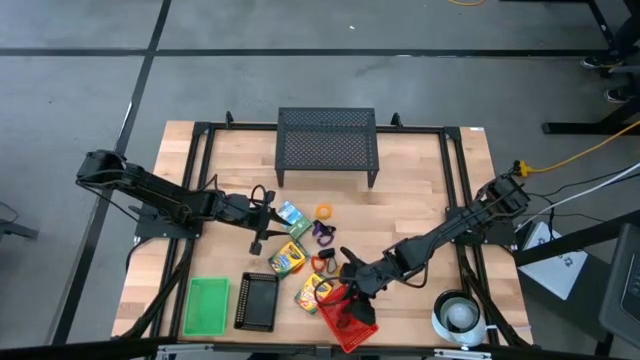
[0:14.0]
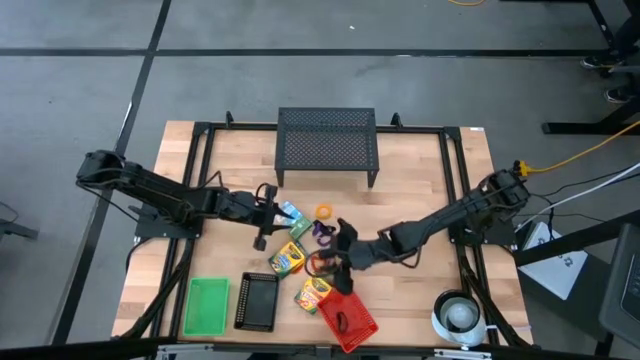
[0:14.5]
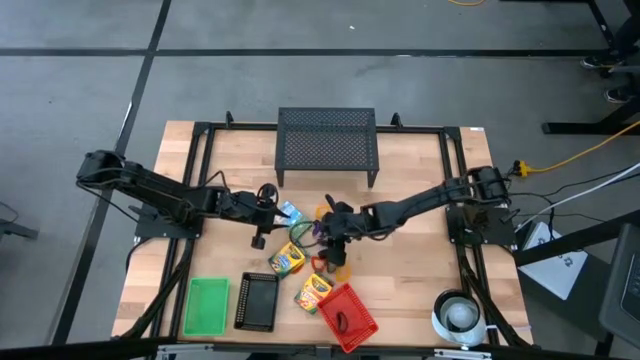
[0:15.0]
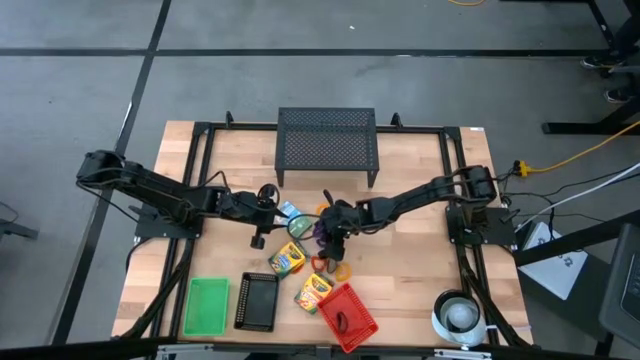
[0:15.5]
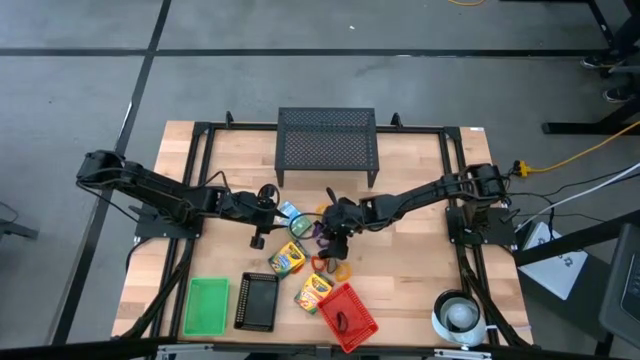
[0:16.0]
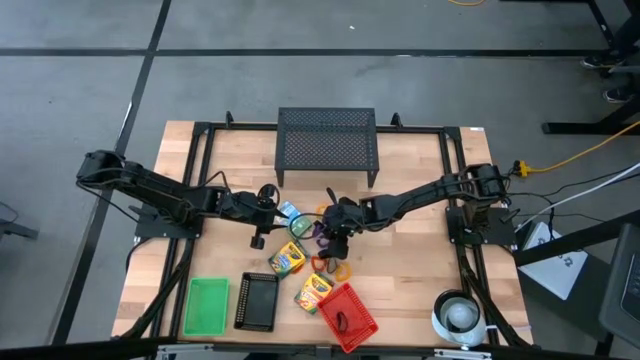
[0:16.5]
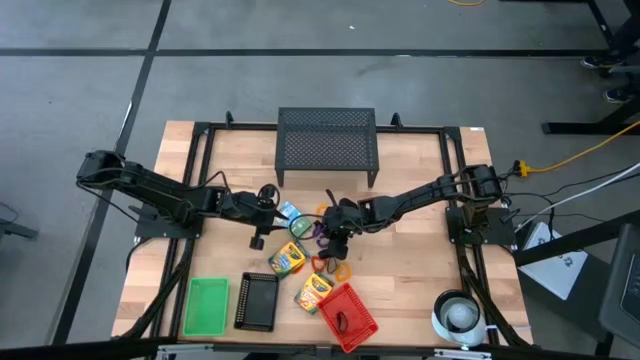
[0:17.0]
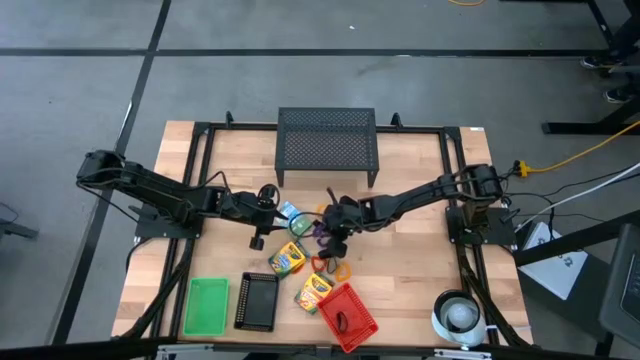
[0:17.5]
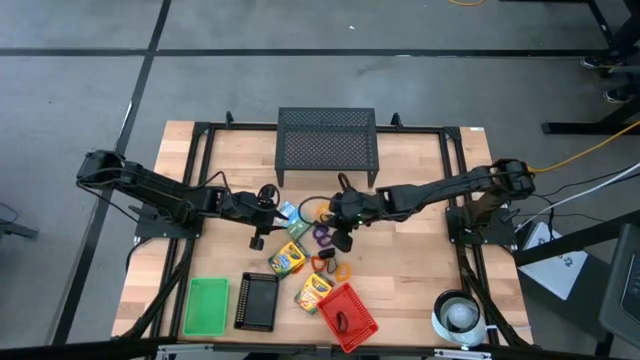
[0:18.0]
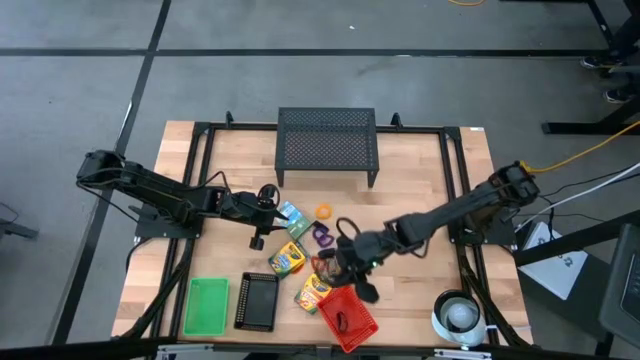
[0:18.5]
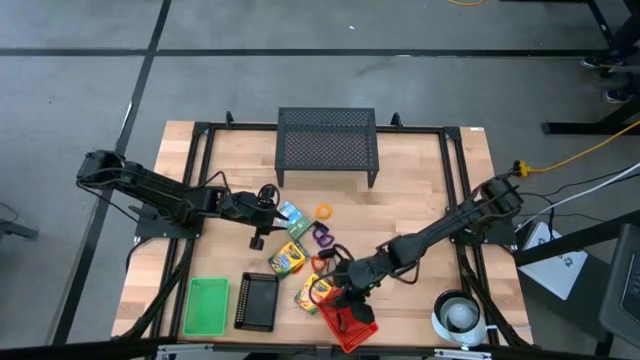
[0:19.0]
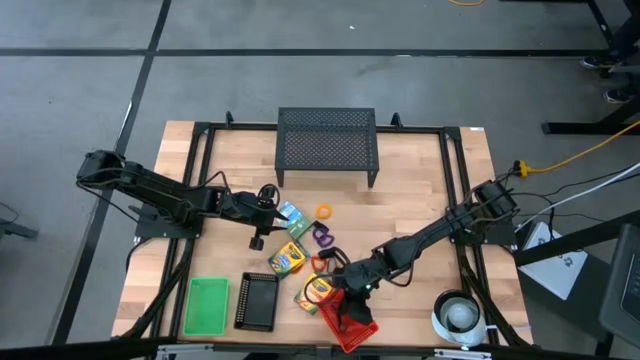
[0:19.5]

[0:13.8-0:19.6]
Task: Pick & Place Office Desk Supplies
Put the black rubber band into the red bin

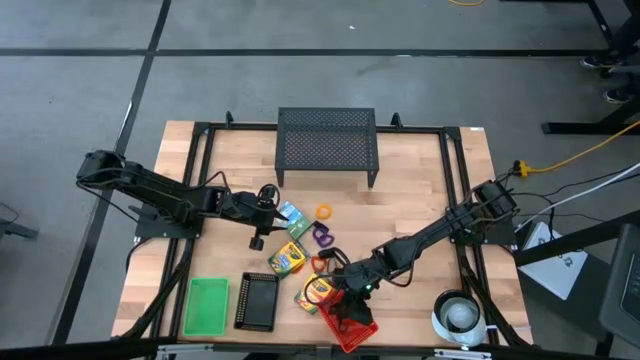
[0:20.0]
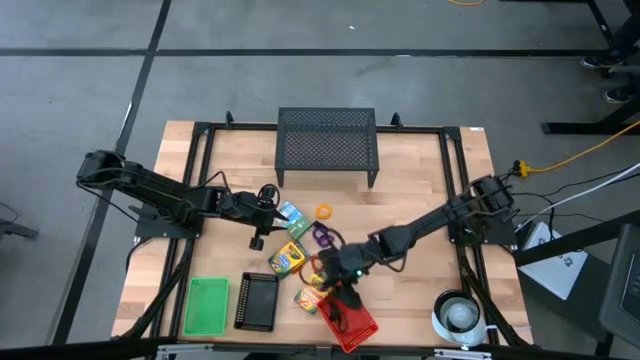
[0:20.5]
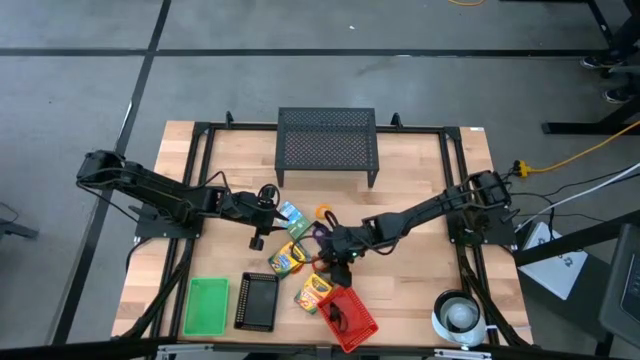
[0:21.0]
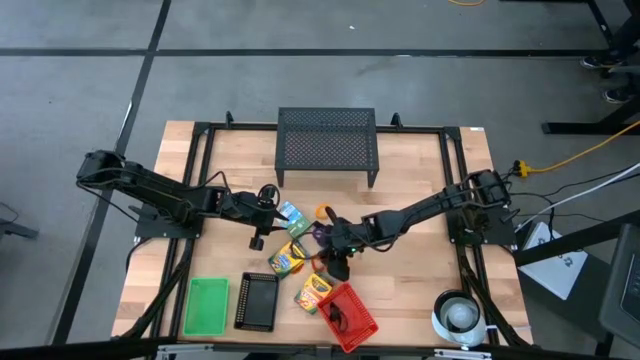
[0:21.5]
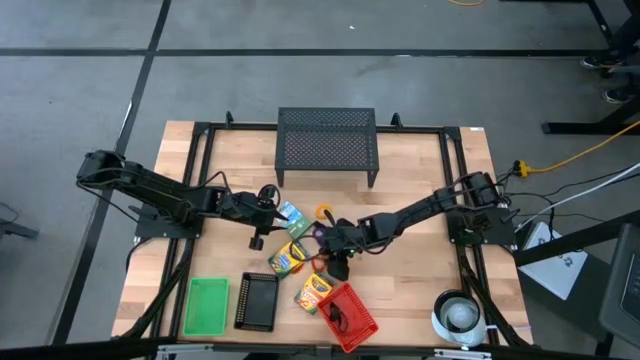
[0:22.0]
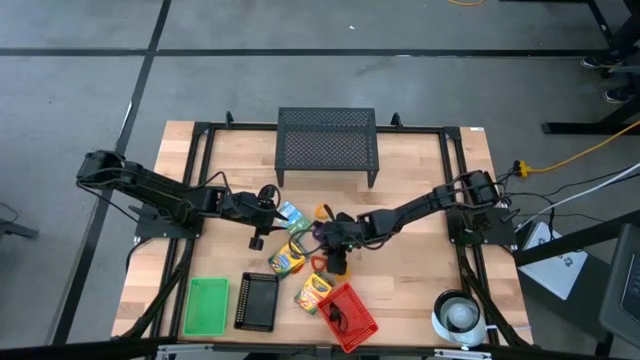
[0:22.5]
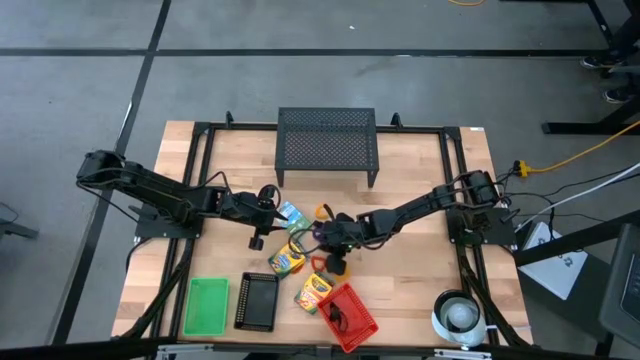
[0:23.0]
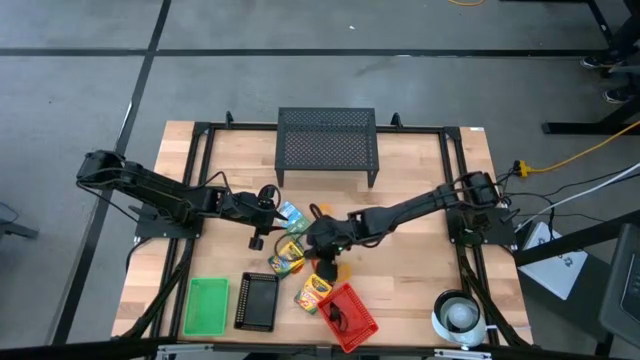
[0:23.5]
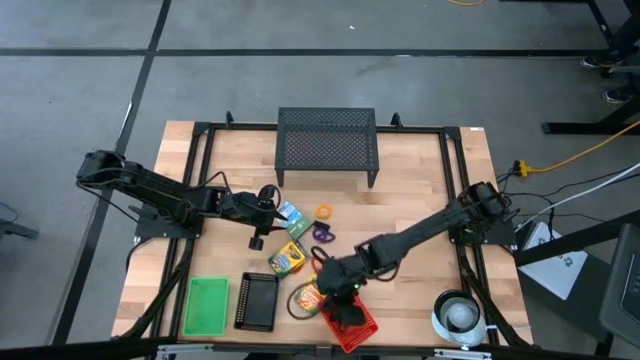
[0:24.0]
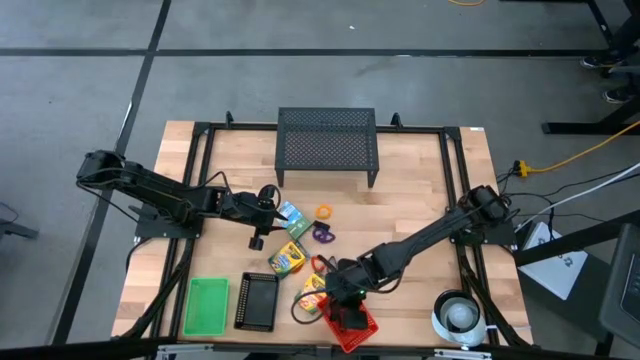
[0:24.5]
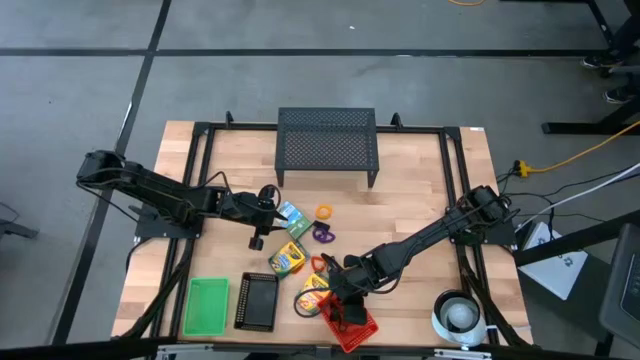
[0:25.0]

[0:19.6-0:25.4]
Put the black rubber band into the red bin

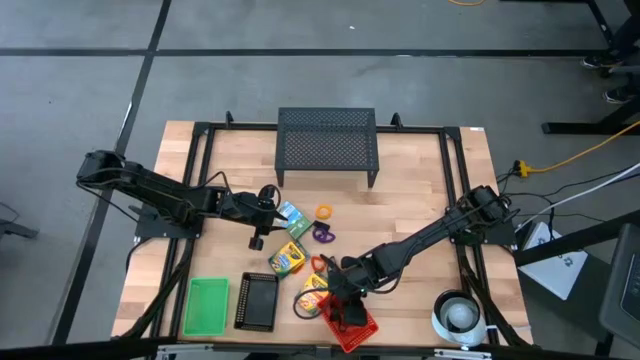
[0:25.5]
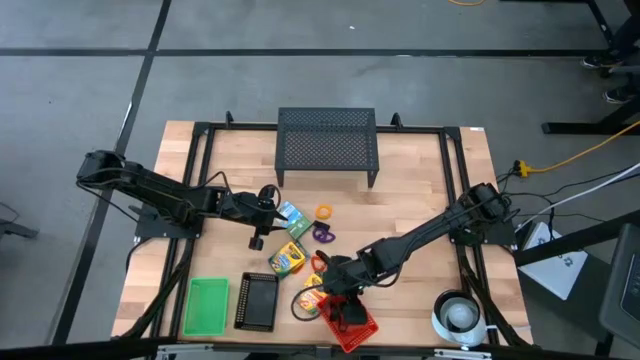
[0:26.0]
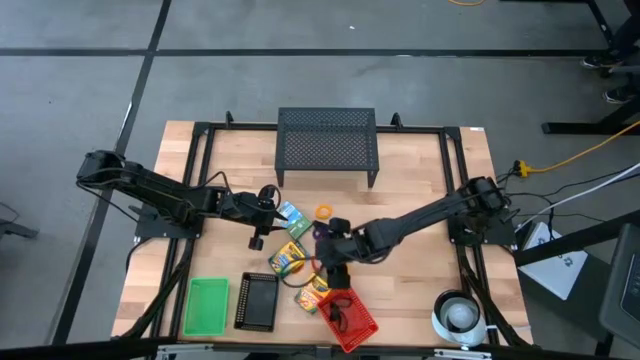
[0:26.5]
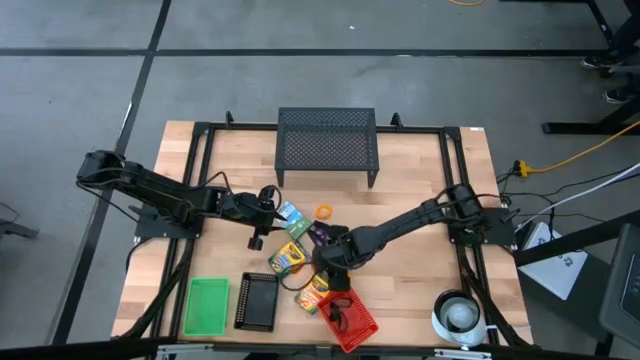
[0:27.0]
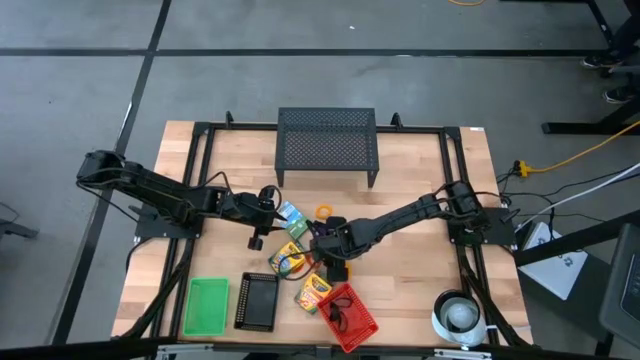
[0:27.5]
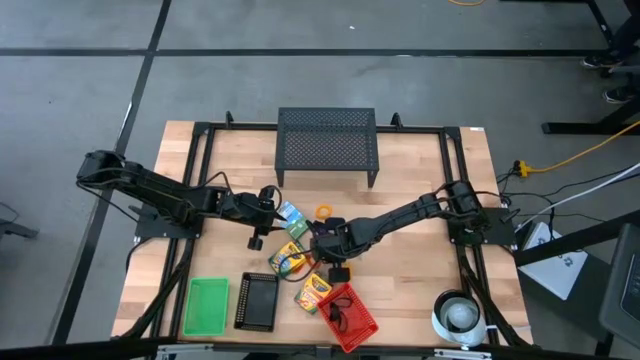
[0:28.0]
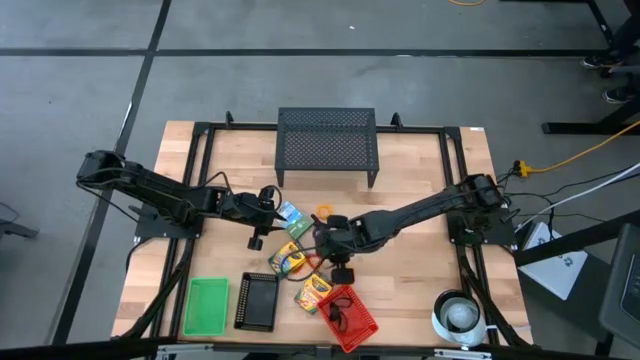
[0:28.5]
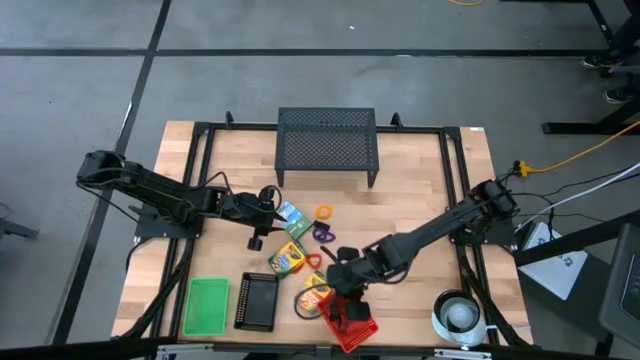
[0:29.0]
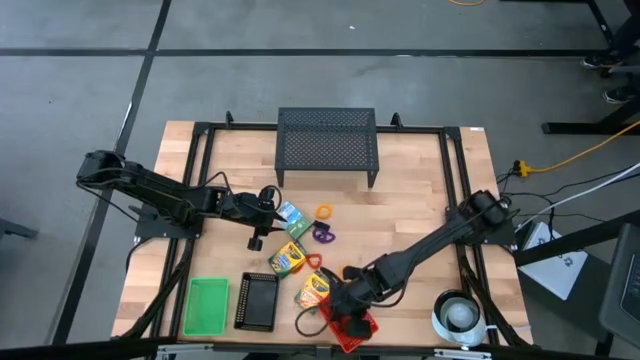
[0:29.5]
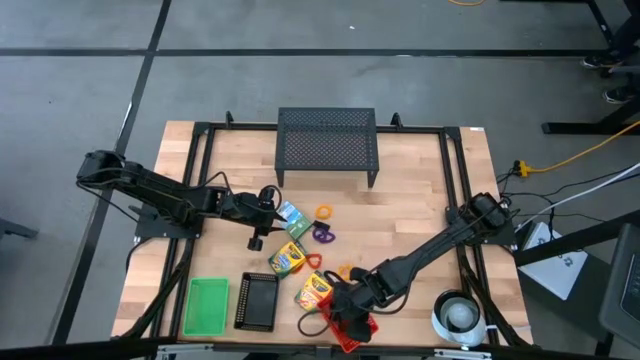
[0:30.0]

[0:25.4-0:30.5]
Put the black rubber band into the red bin

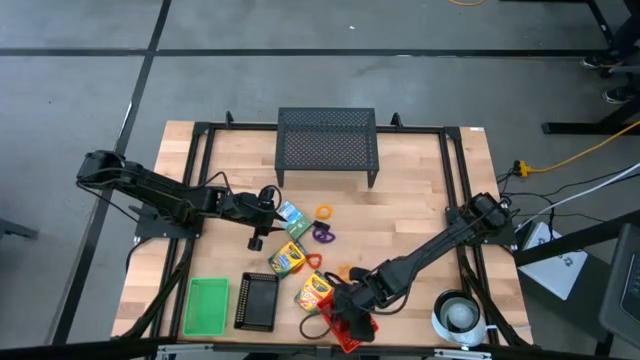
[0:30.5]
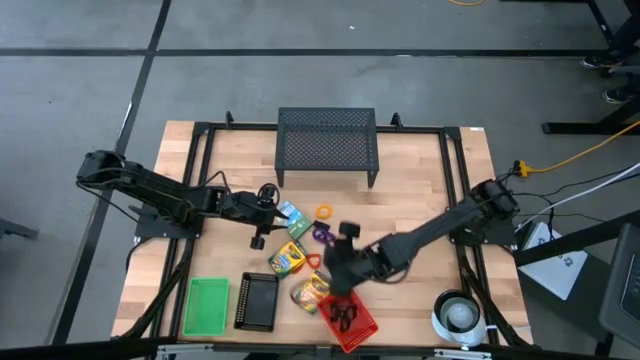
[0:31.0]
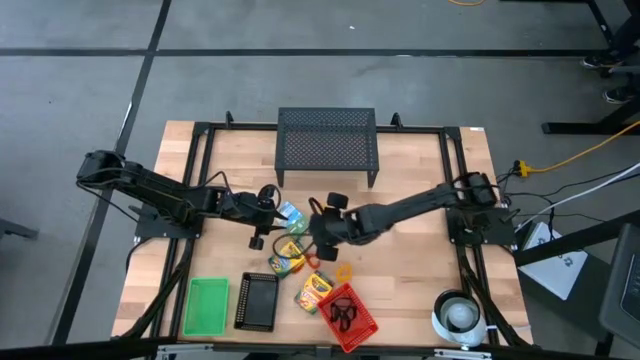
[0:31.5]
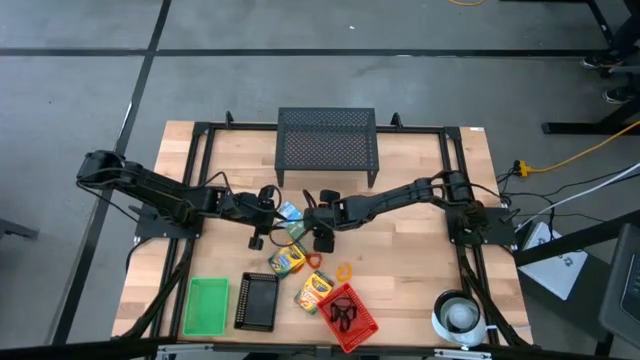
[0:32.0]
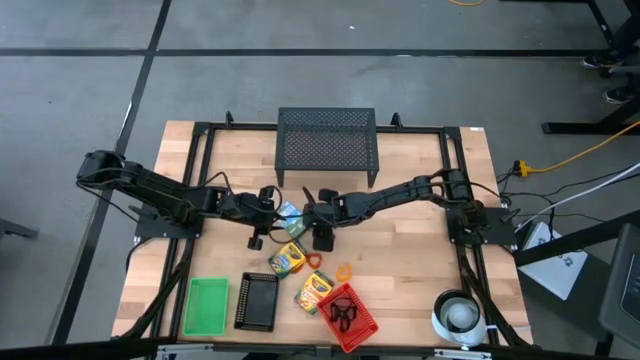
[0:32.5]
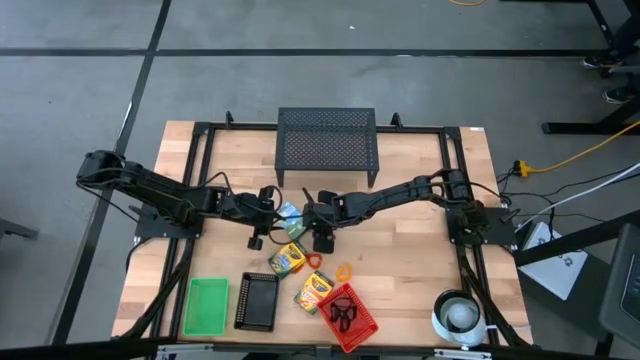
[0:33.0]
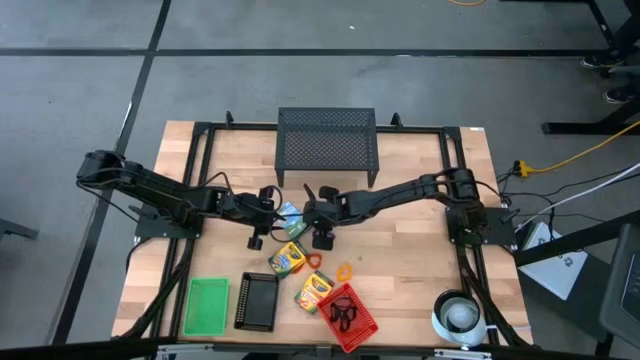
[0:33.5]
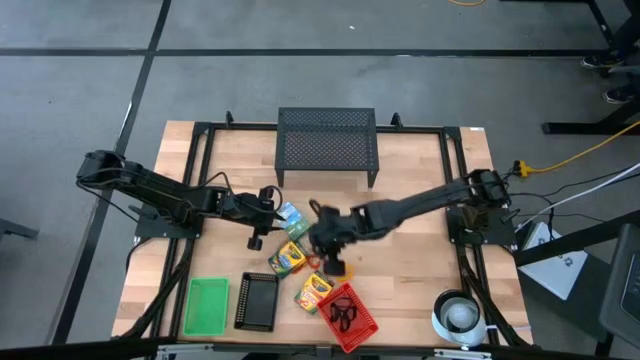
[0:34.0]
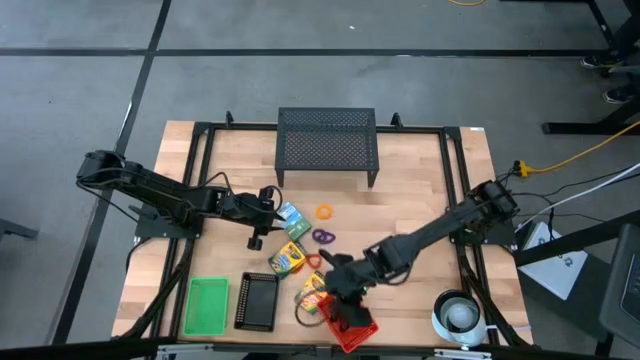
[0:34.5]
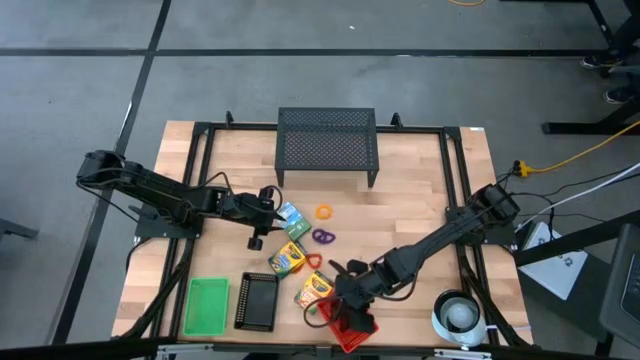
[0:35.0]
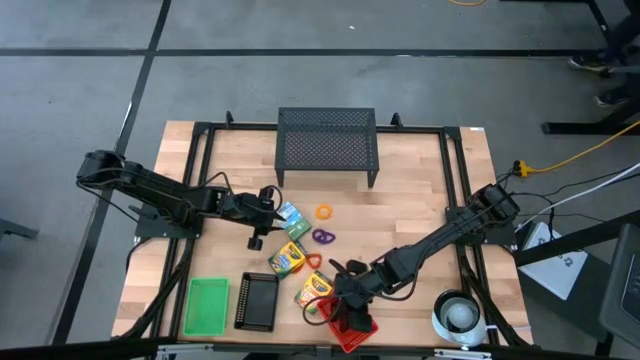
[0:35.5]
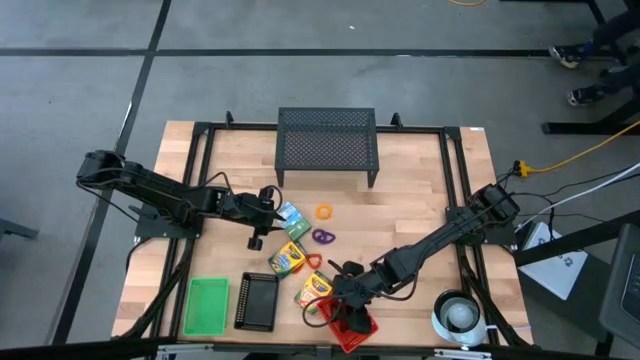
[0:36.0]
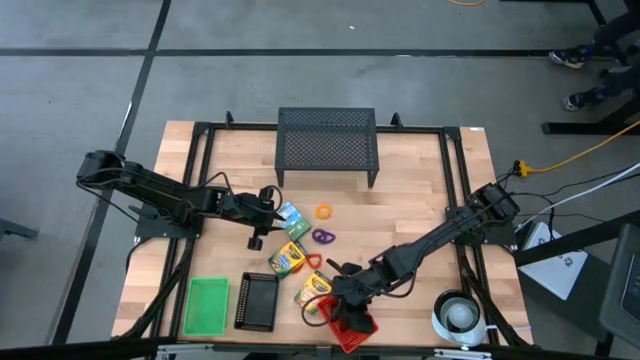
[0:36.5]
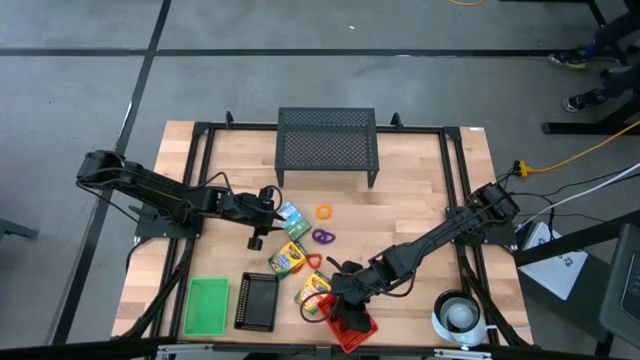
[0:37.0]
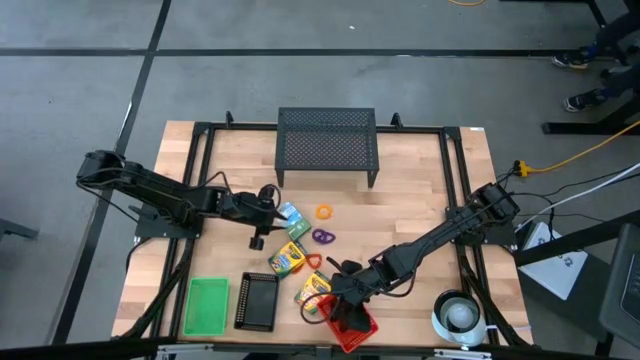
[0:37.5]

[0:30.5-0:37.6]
Put the black rubber band into the red bin
